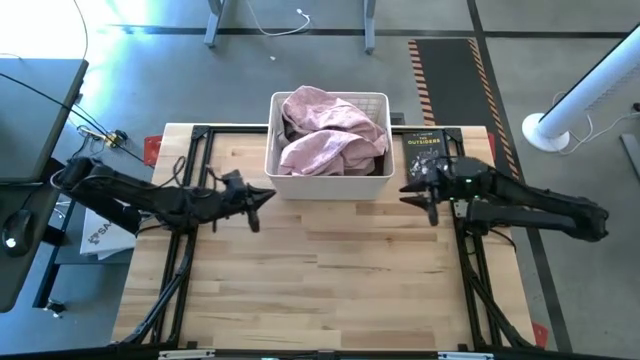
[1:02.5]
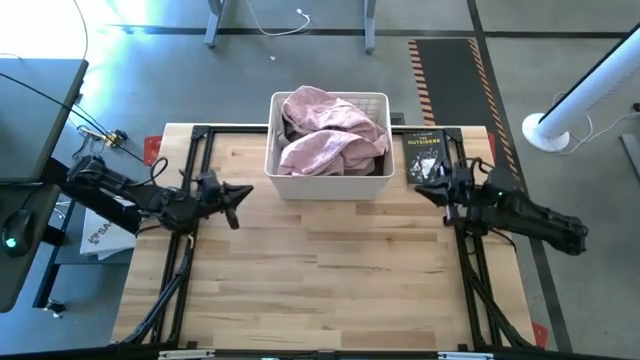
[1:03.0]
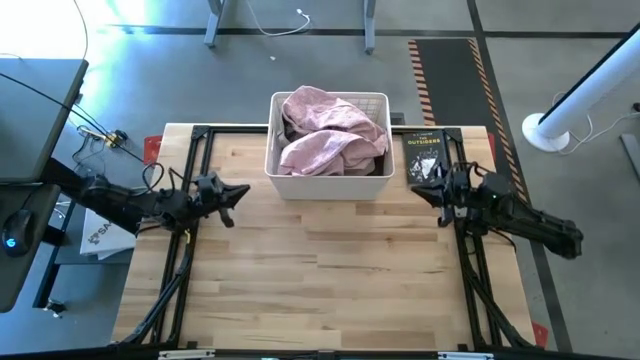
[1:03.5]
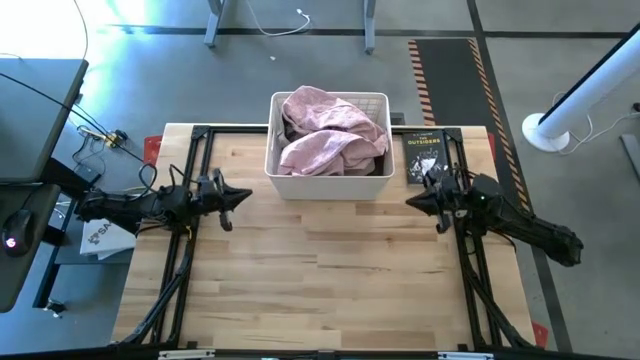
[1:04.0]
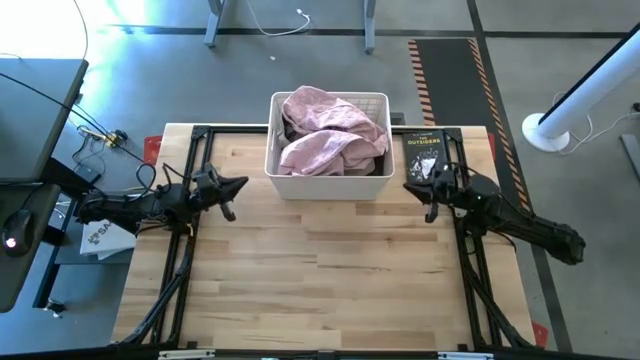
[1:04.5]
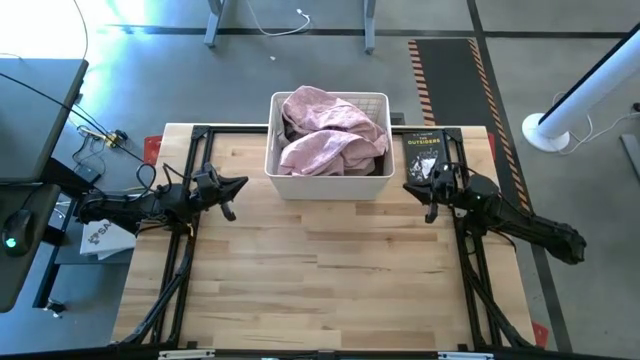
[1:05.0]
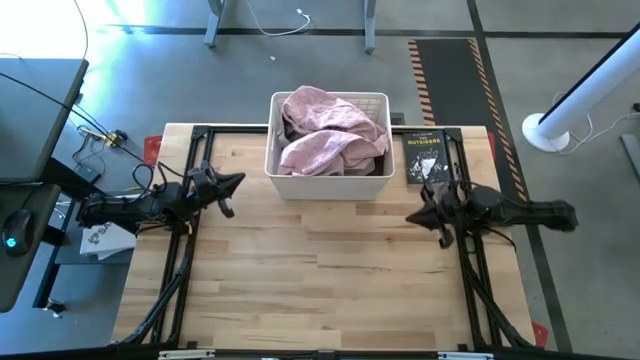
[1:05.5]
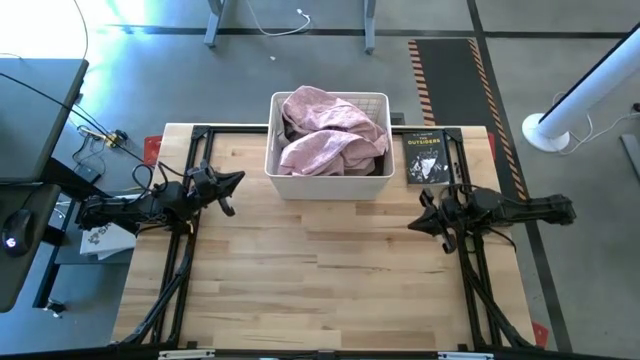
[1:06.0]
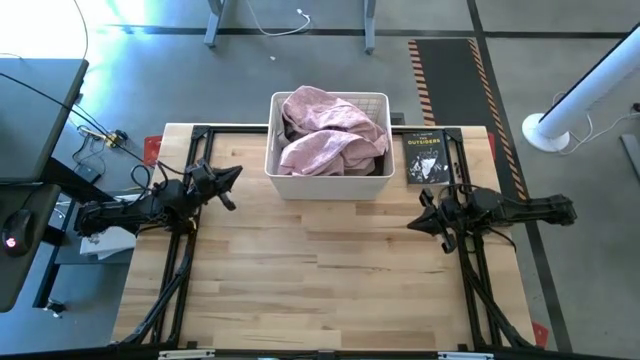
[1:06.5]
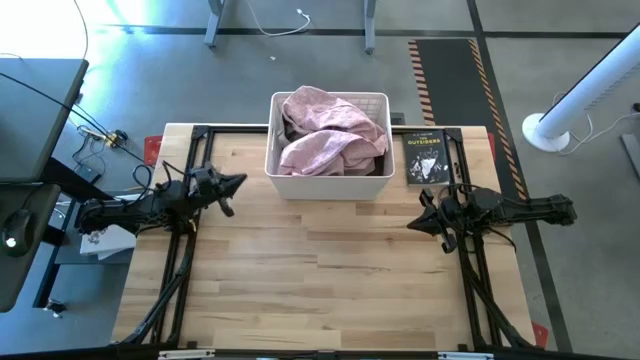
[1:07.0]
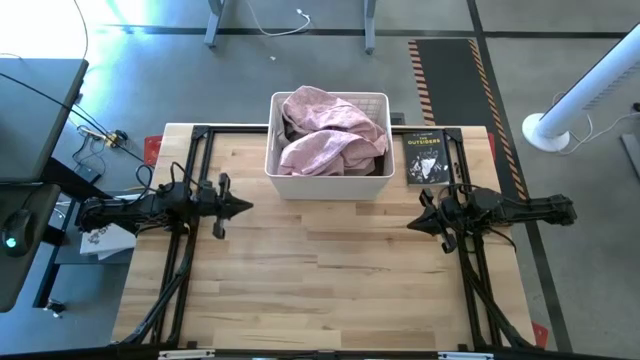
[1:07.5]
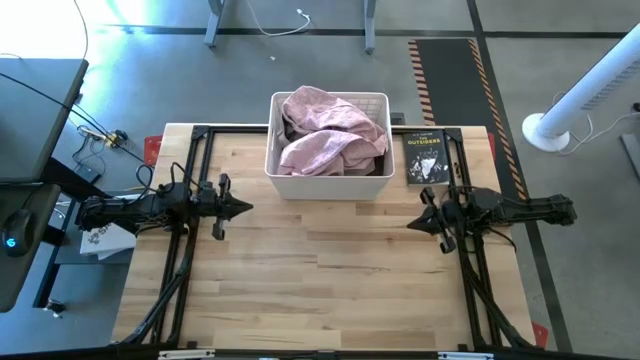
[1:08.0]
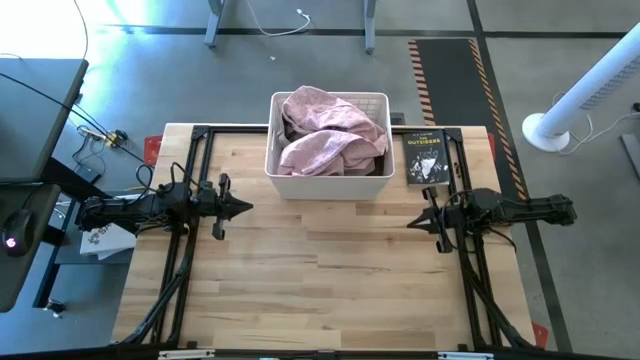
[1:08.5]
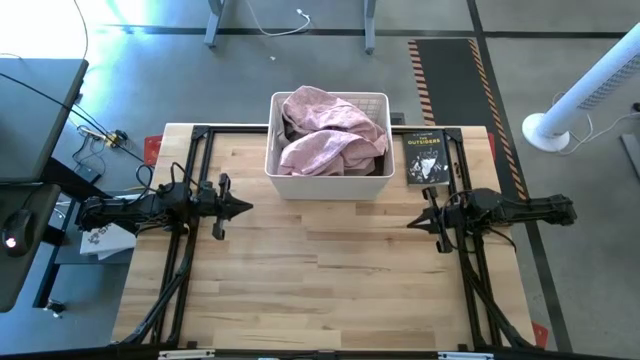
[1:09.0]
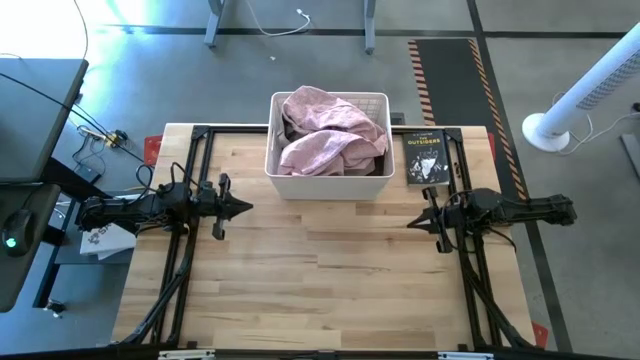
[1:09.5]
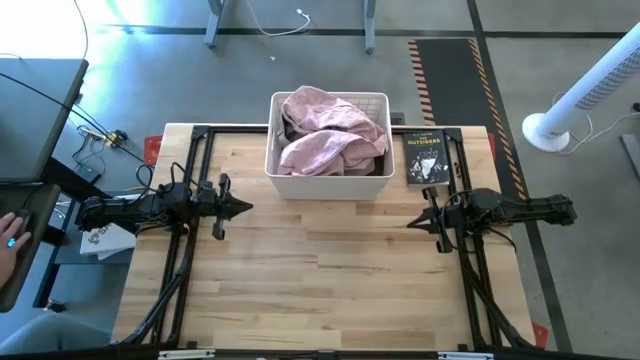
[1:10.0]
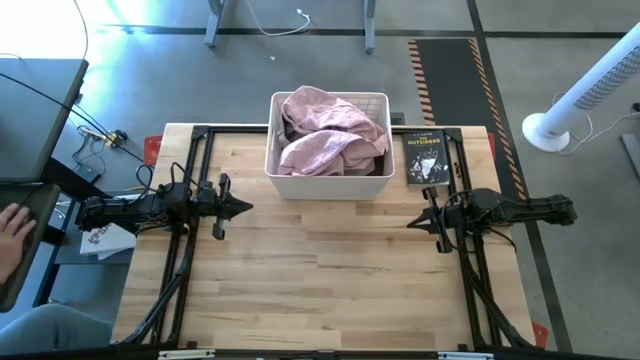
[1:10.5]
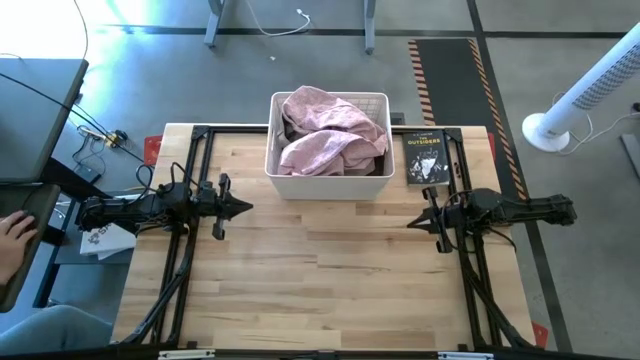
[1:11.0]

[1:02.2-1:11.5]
Task: Sort clothes
Return to Home Position

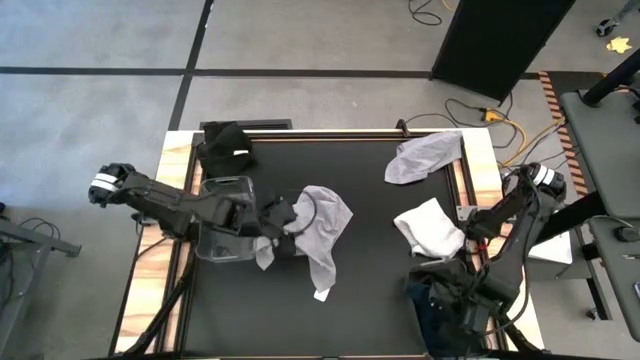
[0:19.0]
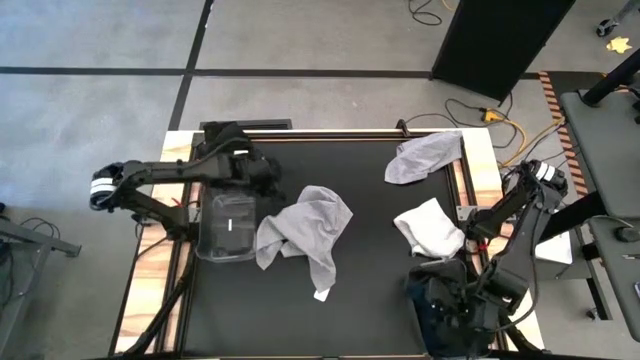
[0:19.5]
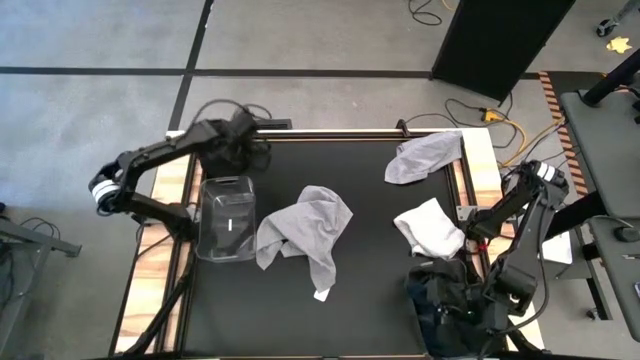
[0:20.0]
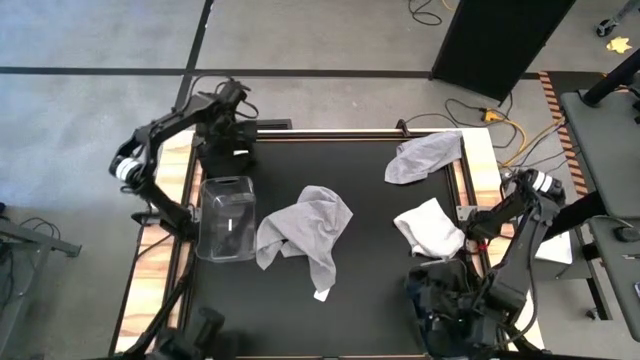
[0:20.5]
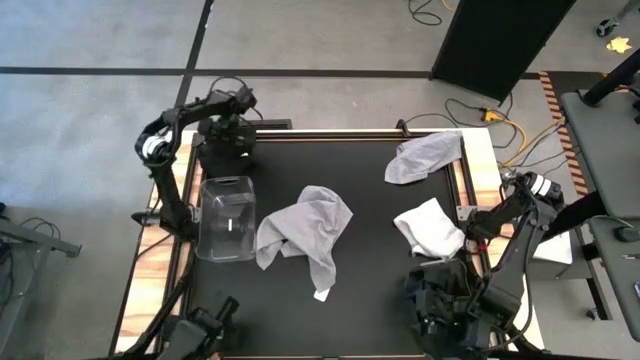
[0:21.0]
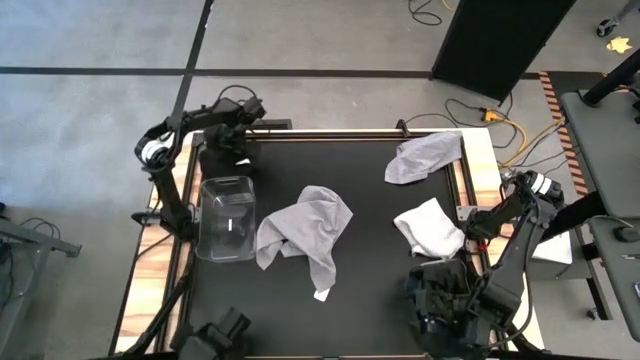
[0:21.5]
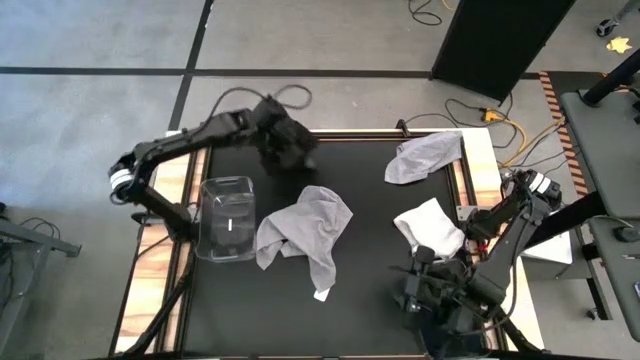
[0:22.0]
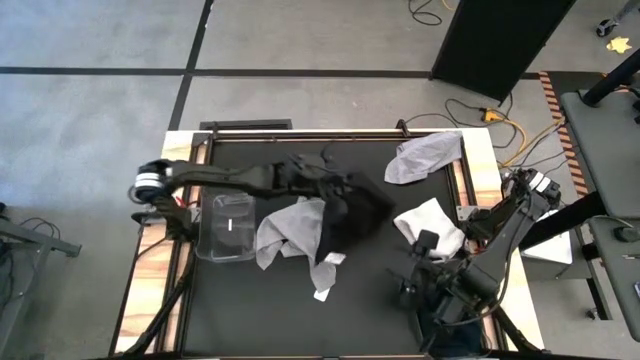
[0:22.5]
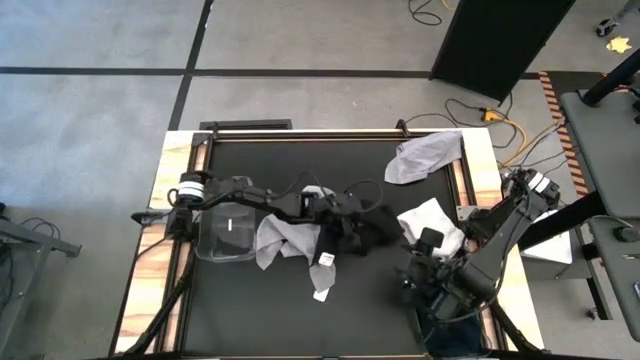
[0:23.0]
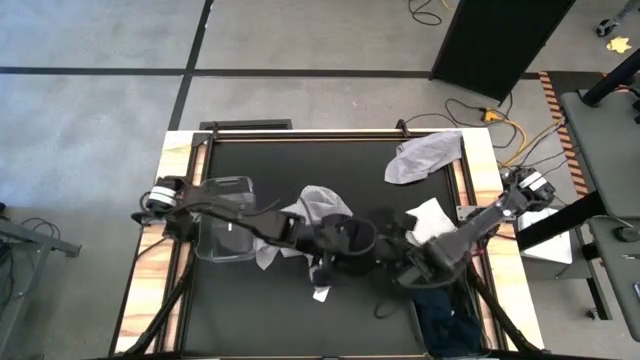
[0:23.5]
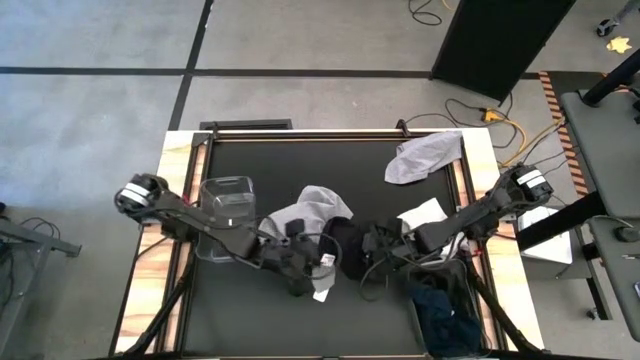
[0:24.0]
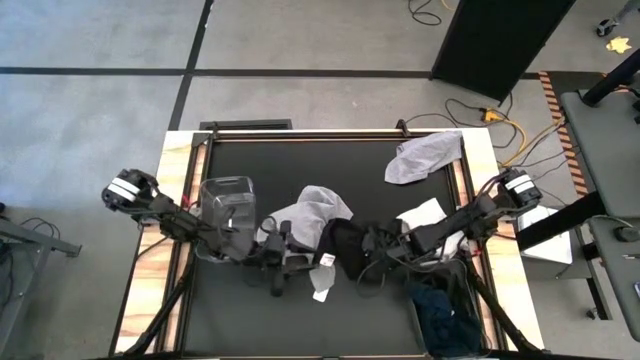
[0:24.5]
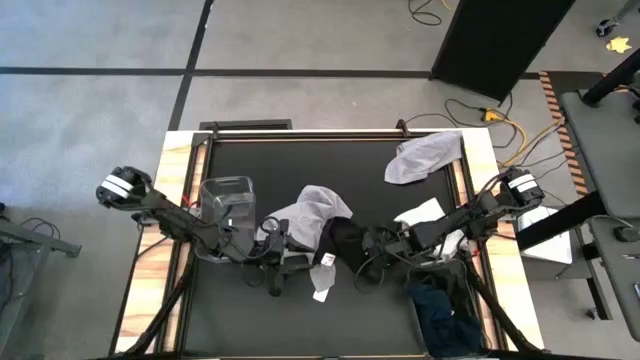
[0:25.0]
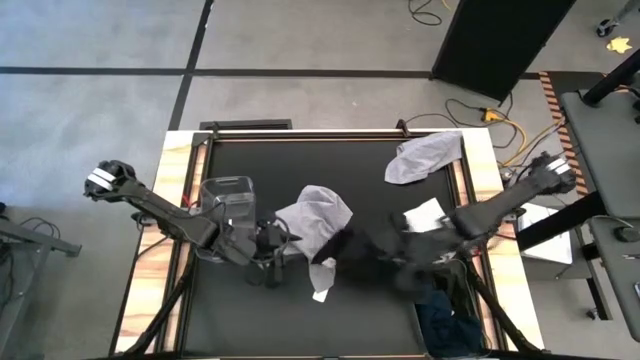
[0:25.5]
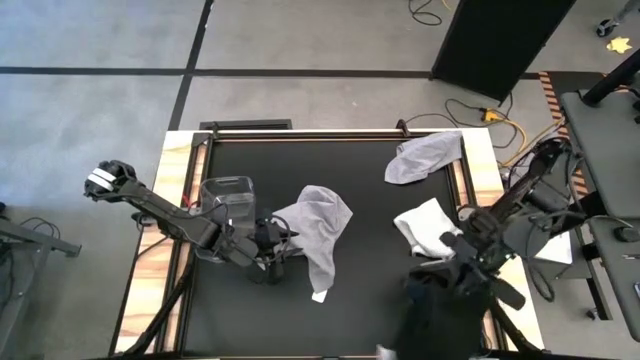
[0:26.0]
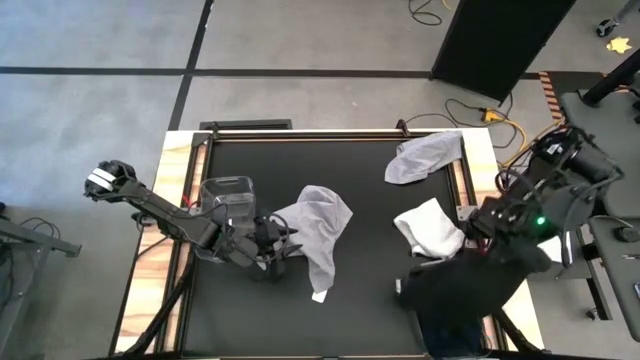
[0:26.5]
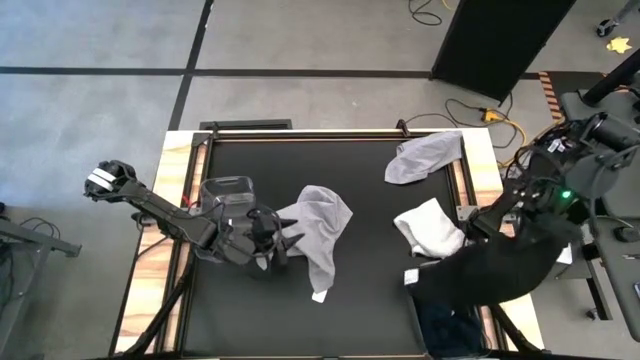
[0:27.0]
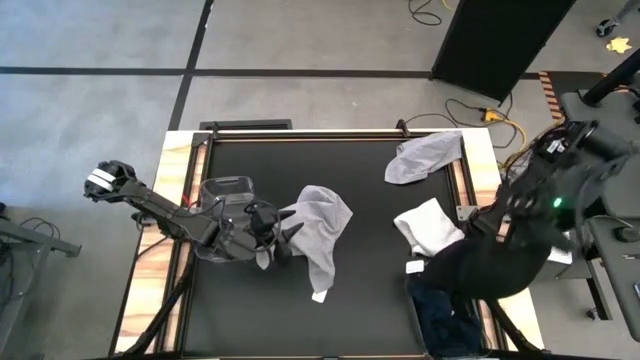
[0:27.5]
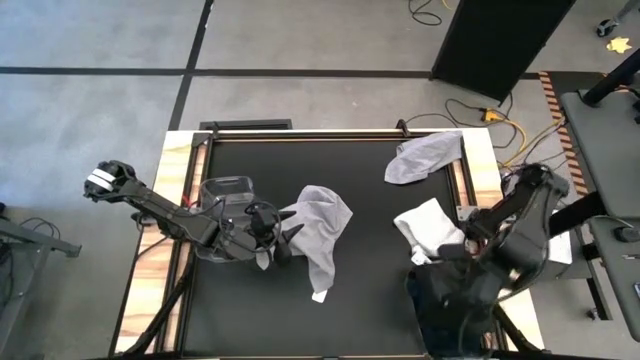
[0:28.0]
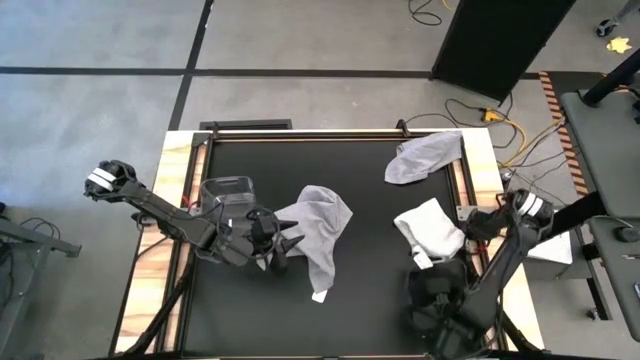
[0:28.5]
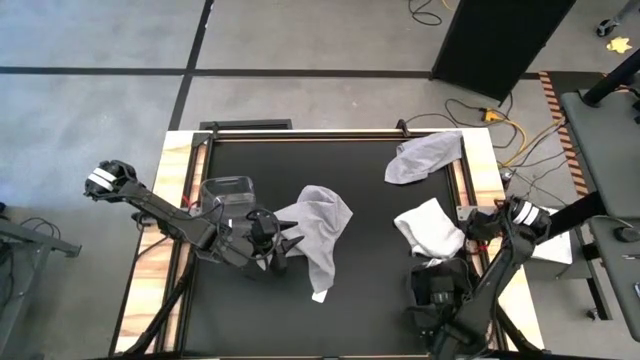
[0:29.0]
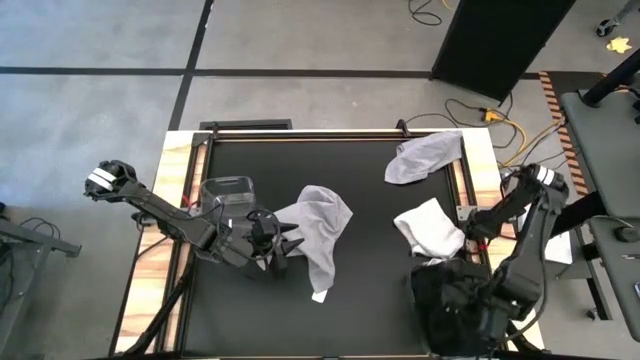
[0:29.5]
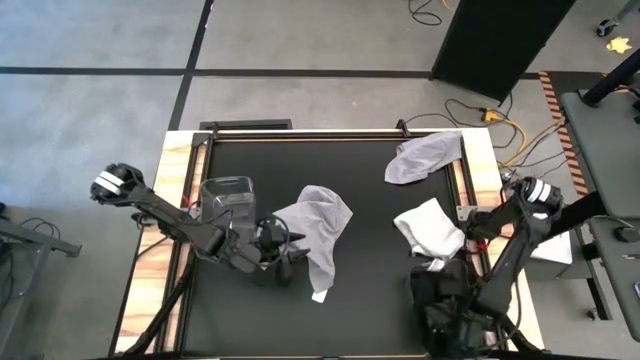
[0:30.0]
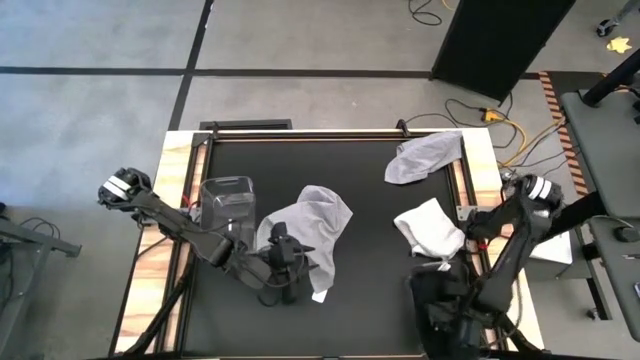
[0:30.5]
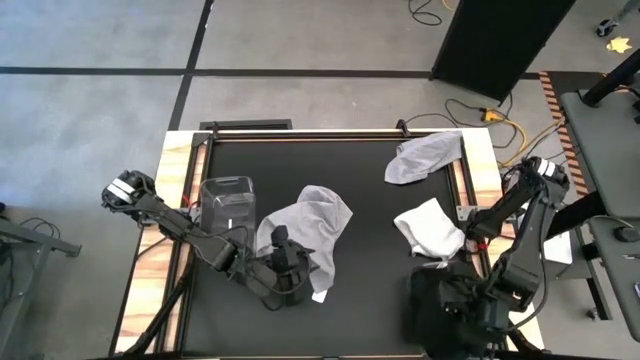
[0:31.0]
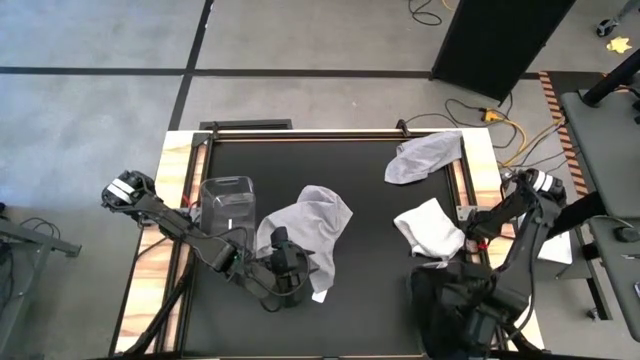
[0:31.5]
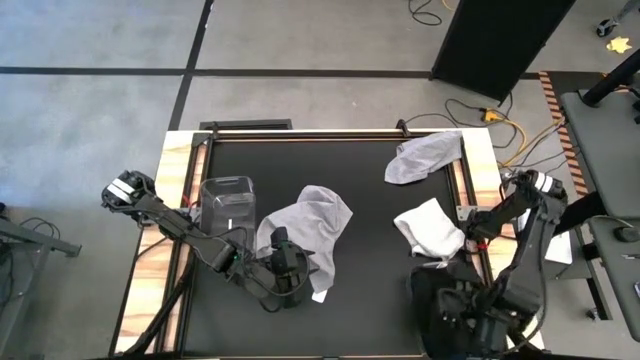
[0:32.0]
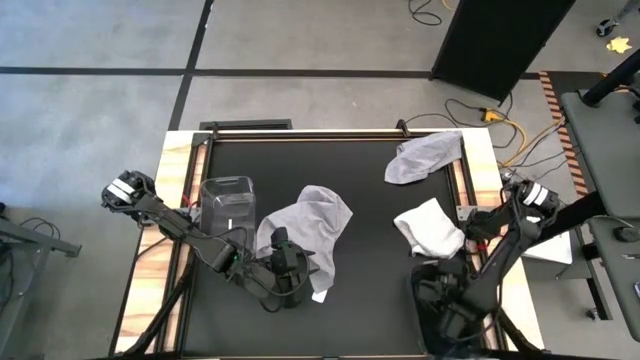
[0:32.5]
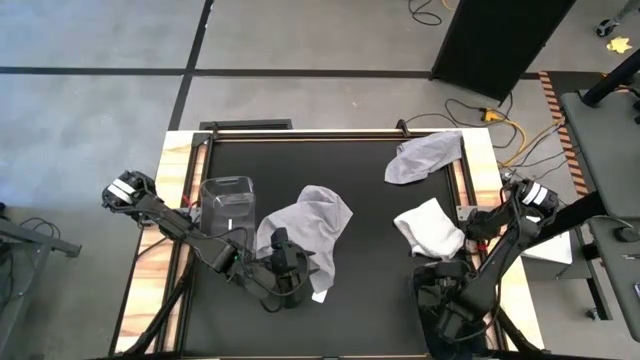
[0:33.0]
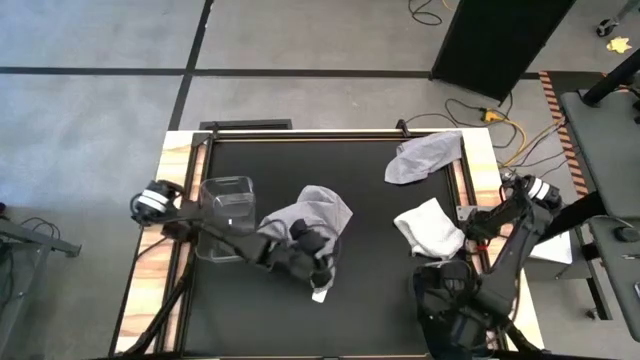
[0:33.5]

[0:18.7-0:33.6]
Task: Sort towels by color in basket
Put the black towel into the bottom transparent bin
